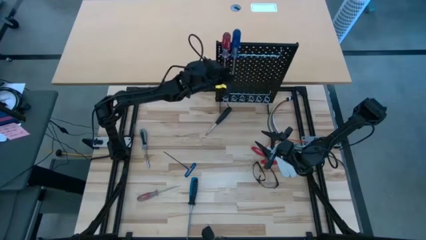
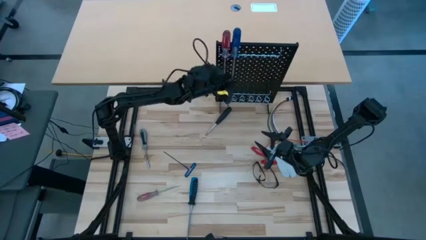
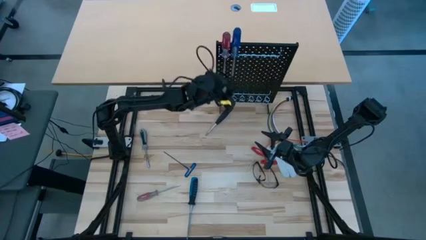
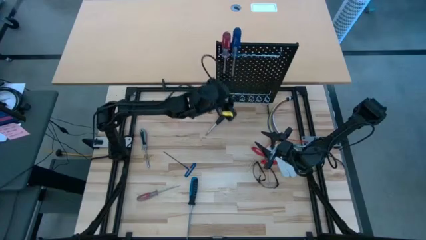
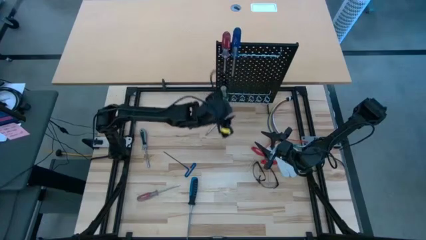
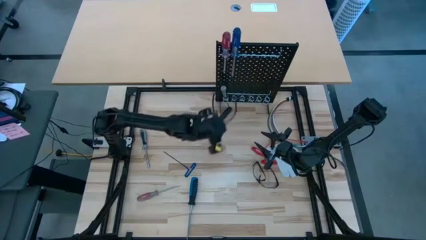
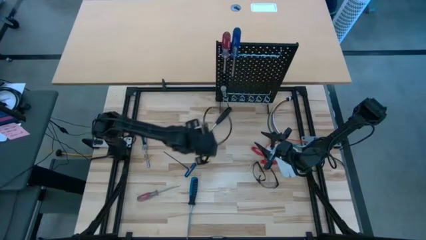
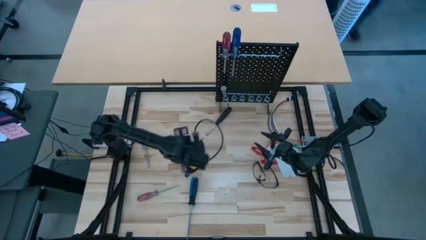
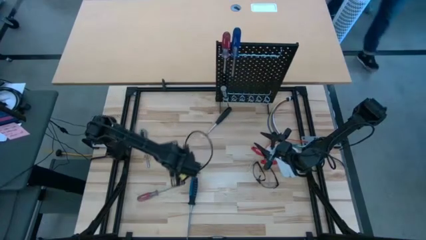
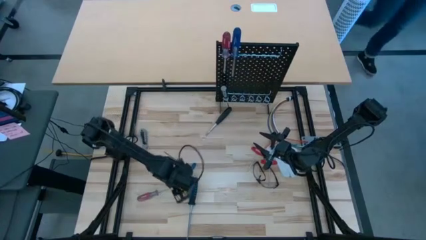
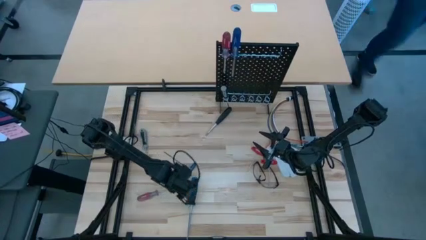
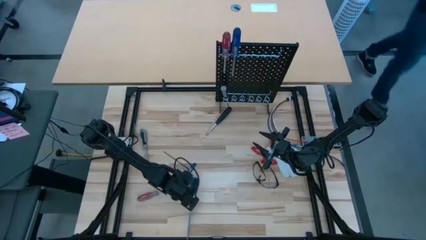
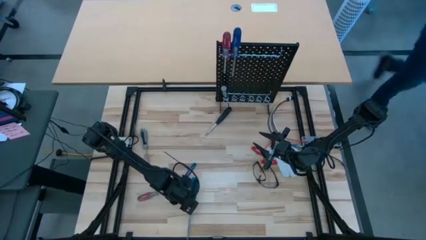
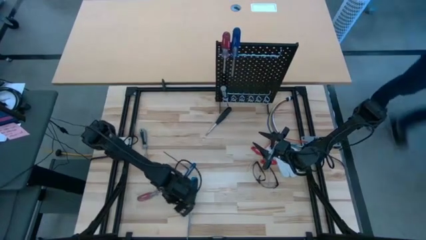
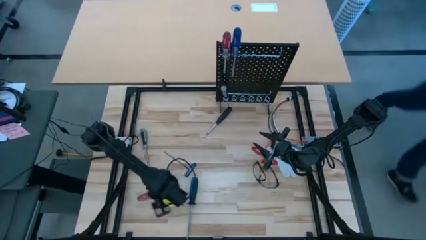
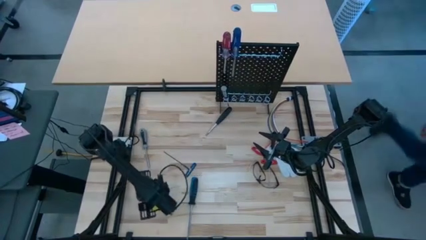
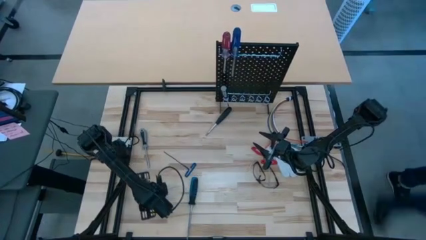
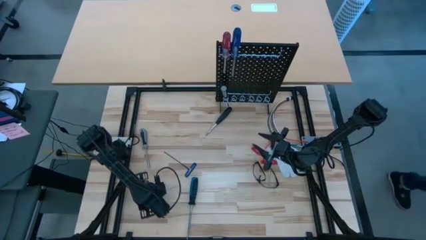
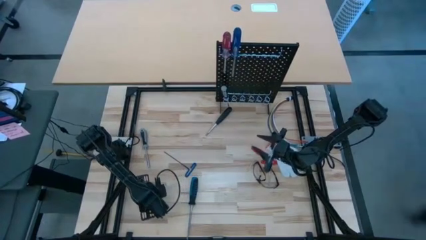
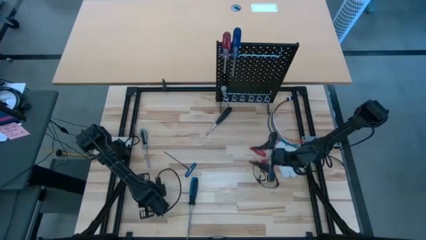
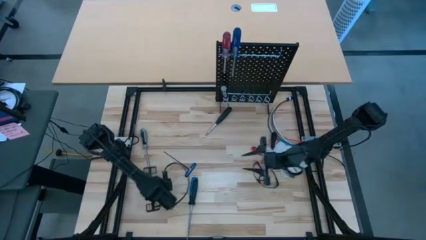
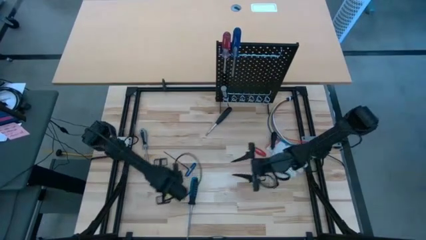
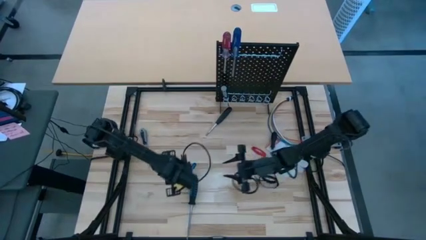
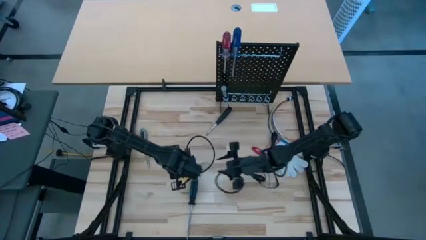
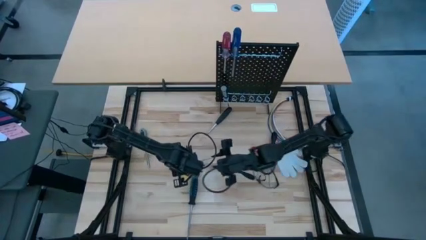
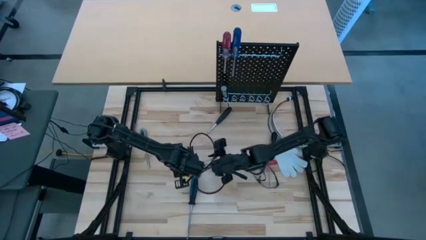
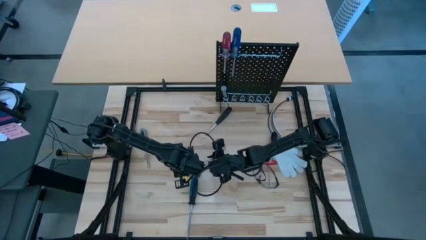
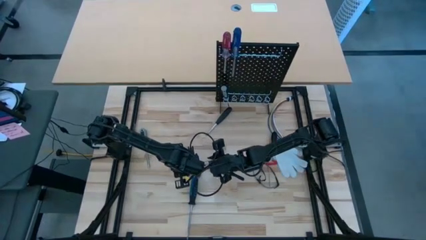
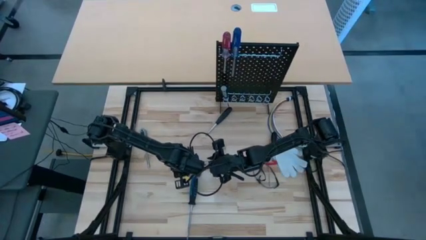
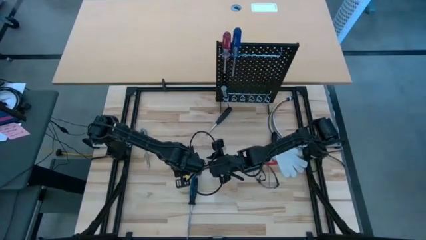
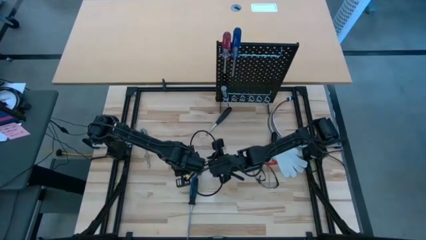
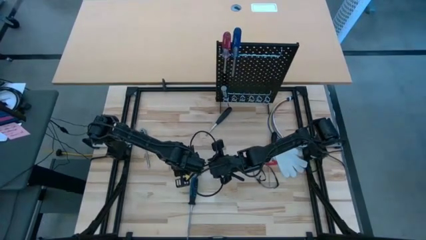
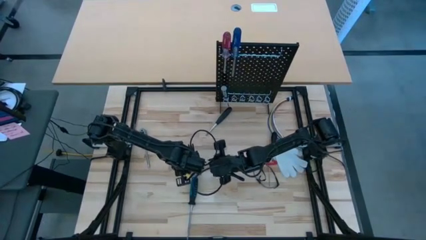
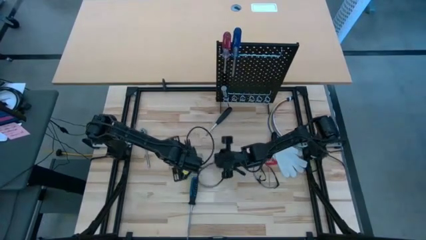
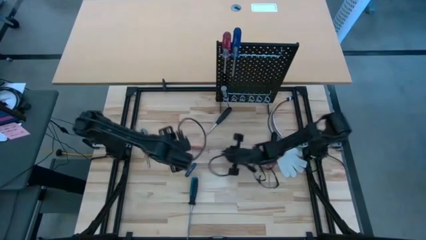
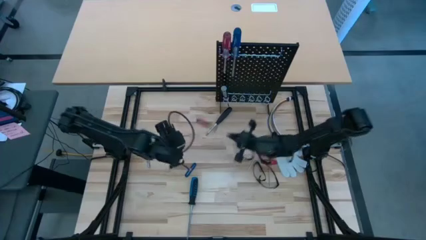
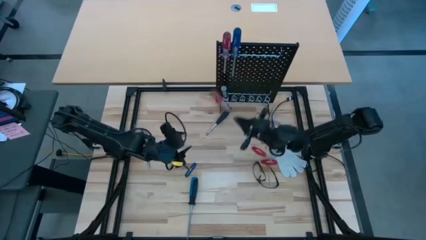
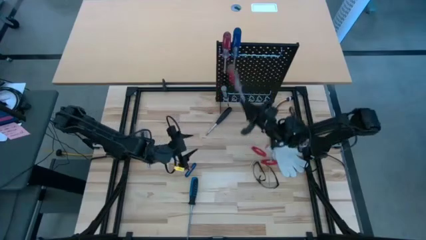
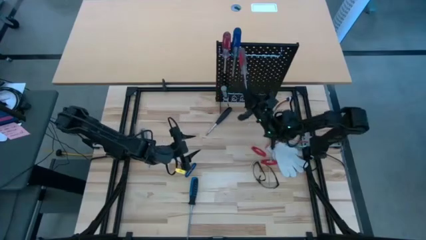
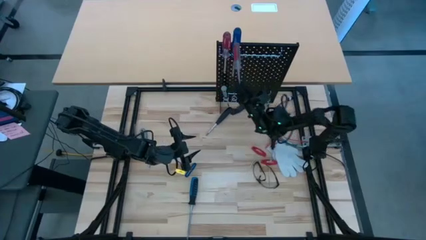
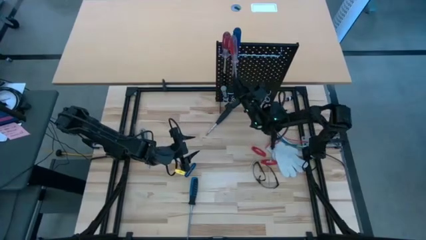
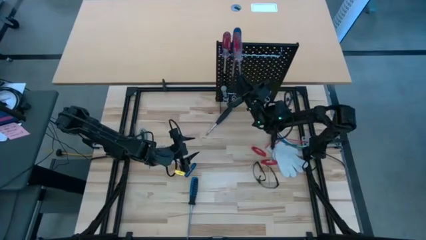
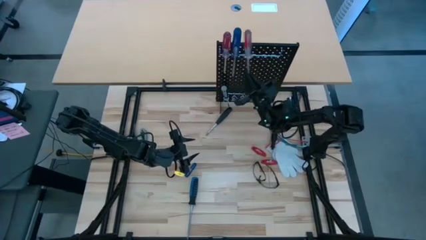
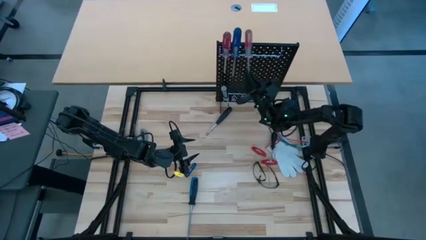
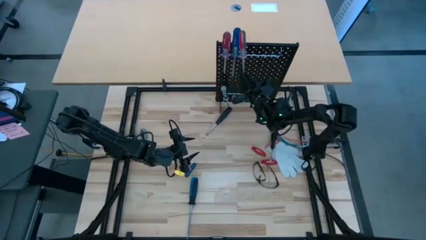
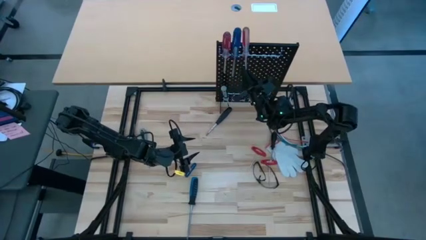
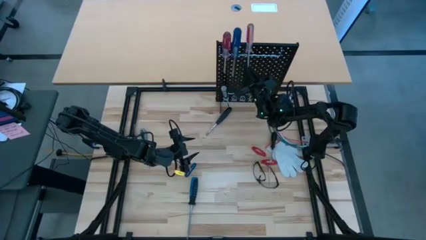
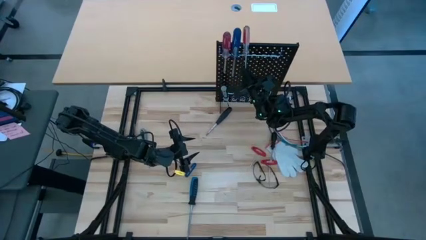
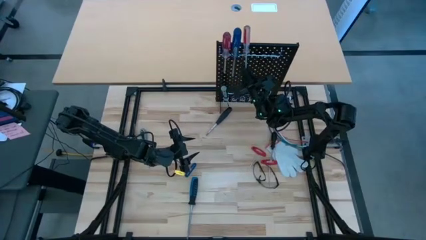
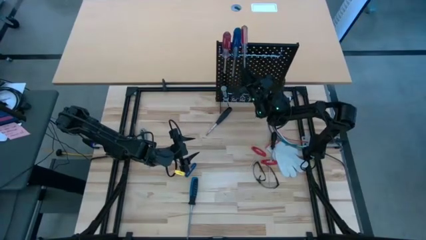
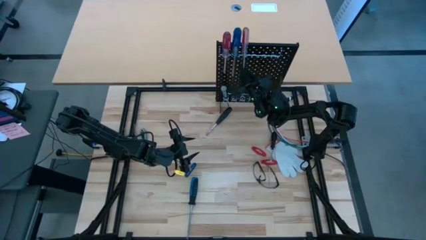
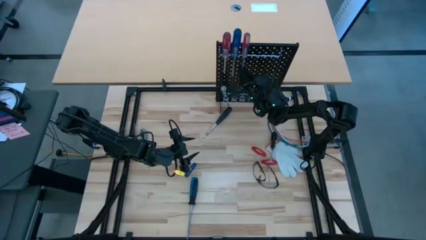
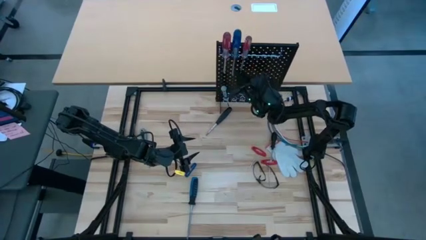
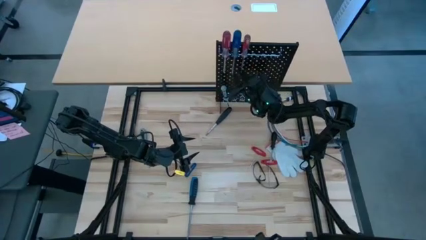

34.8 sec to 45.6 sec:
Task: Hang tools onto peg board
Hang the red screwdriver on the pegboard
